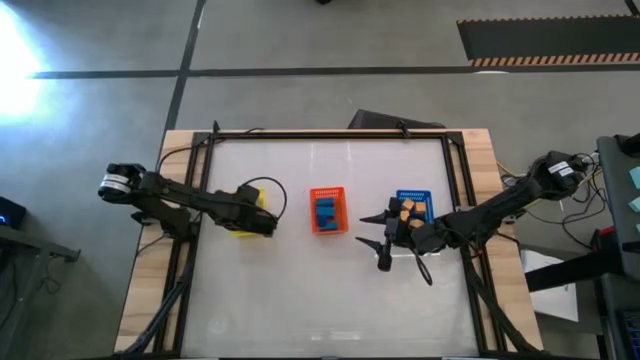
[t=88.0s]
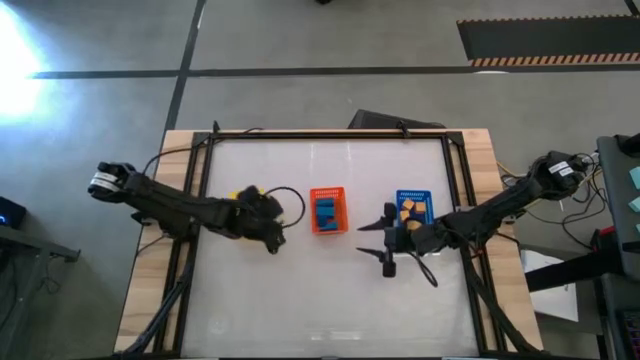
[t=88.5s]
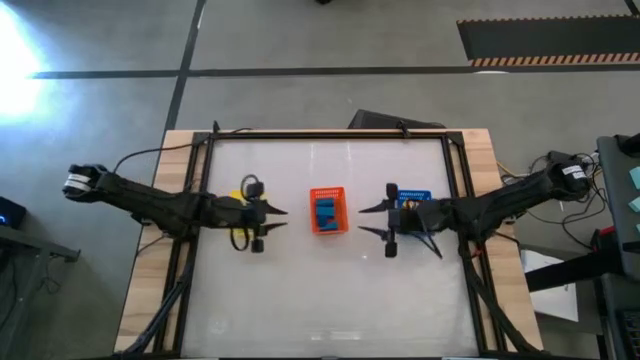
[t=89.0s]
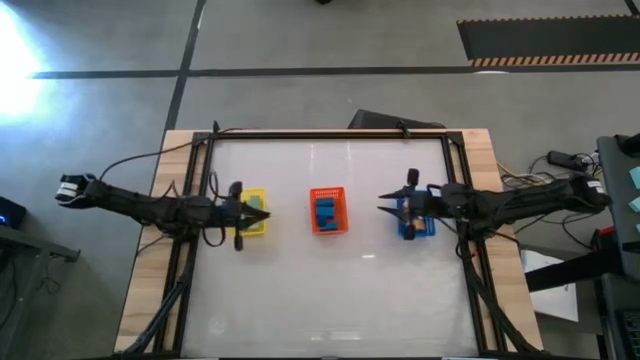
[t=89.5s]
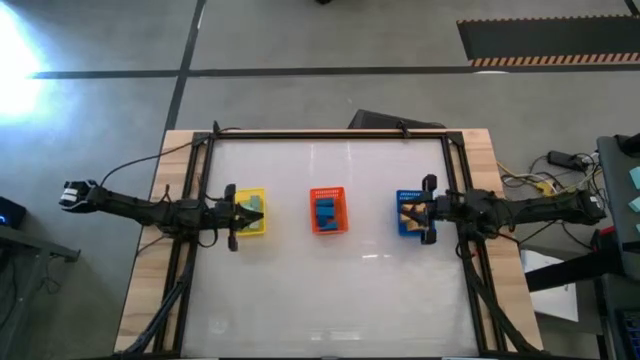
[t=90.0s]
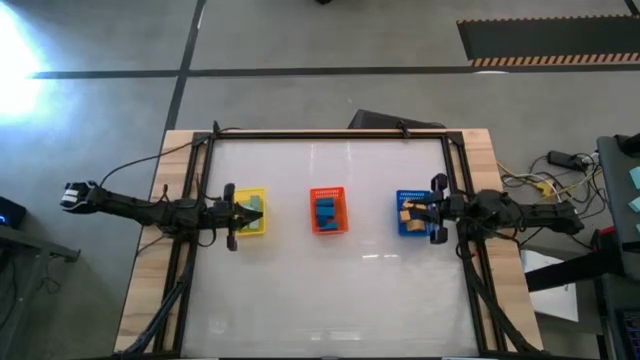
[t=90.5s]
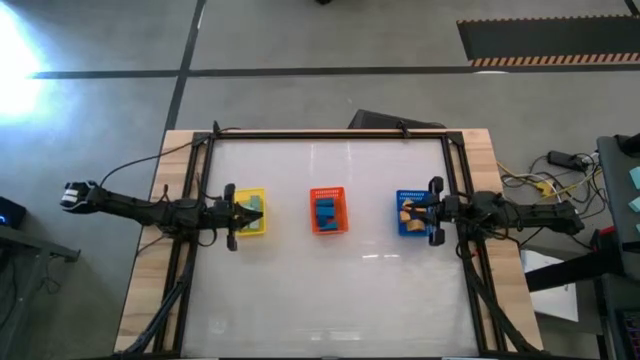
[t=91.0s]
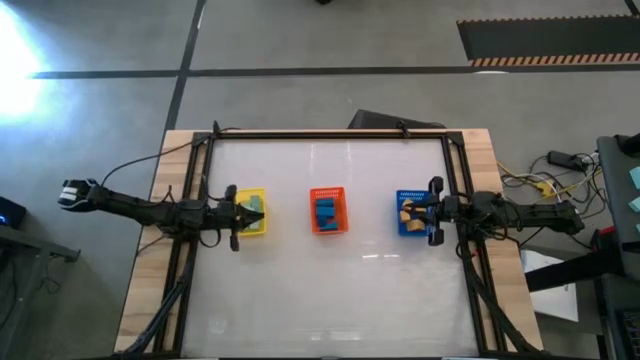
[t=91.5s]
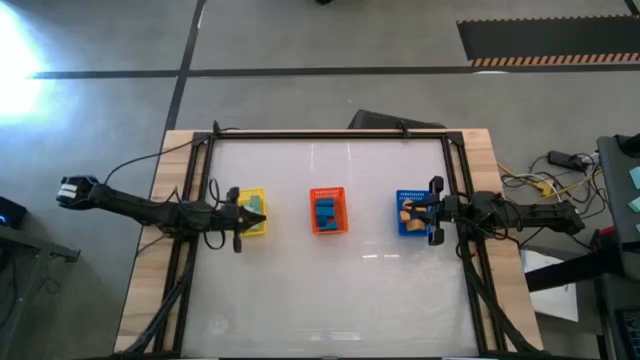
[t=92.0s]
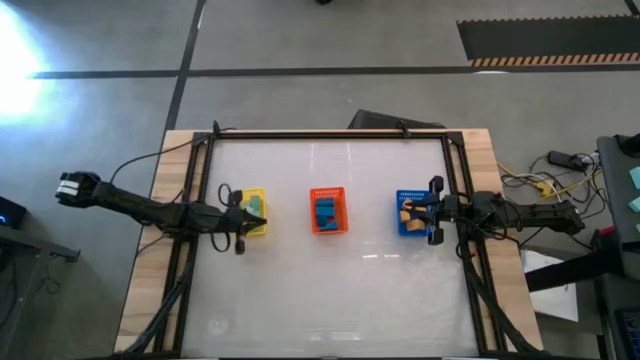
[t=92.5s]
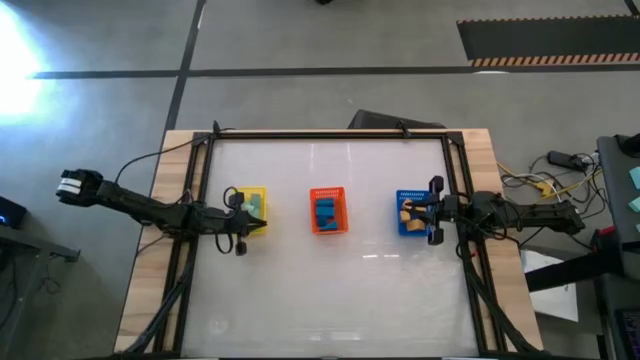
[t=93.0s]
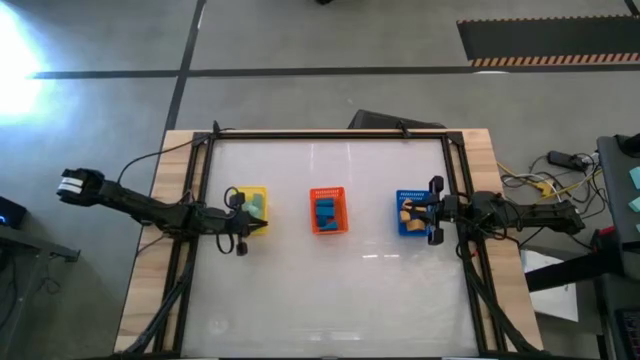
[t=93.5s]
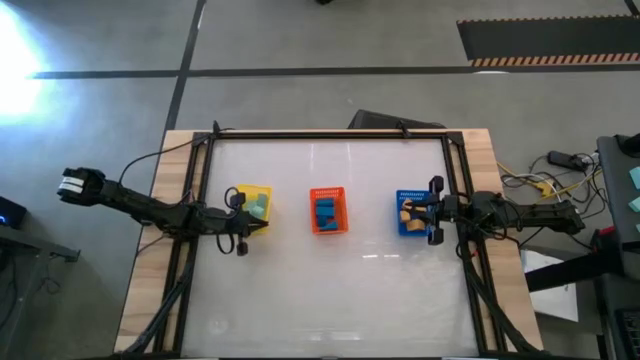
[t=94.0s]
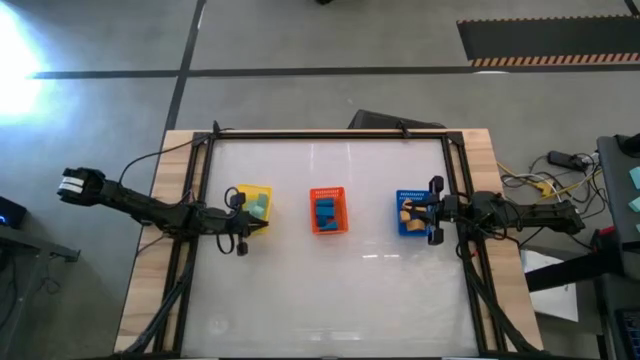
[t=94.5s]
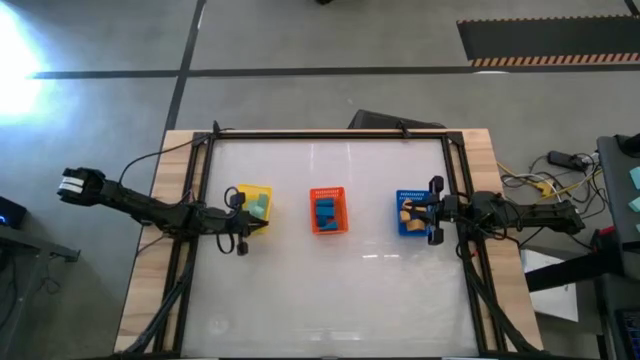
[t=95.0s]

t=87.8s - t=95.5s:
Task: Sort & place blocks by color
Return to Home Position

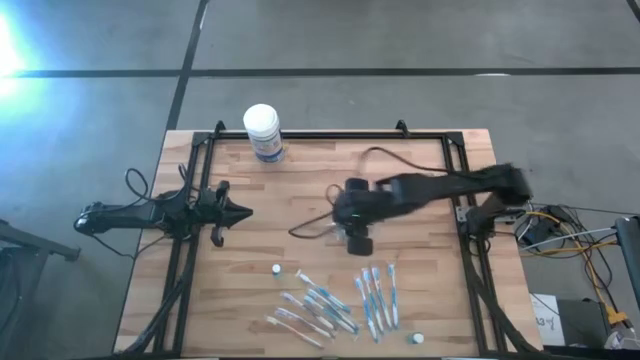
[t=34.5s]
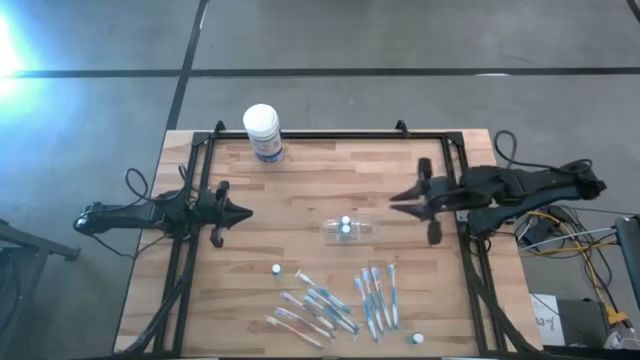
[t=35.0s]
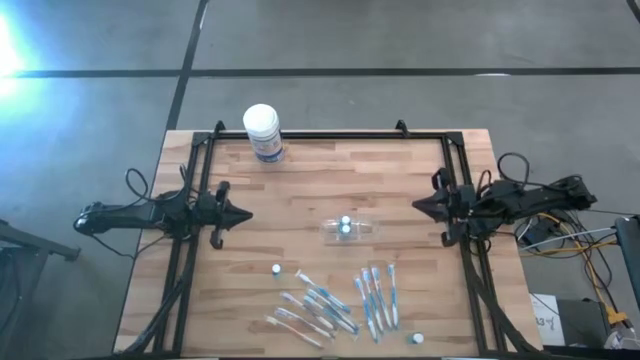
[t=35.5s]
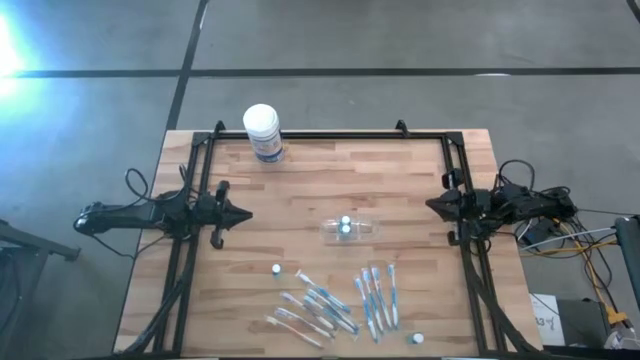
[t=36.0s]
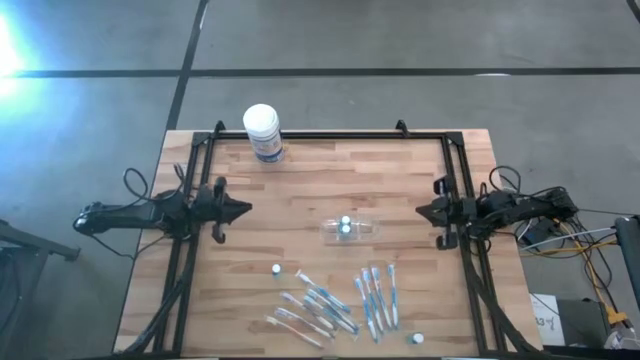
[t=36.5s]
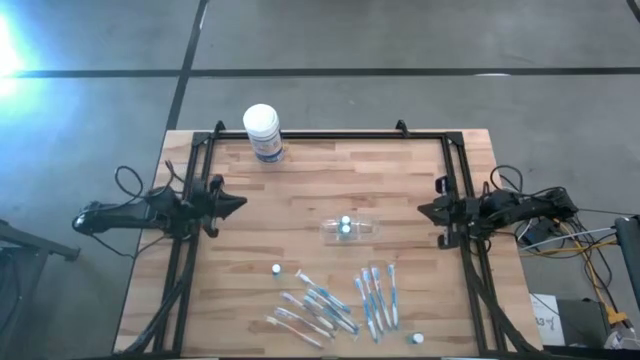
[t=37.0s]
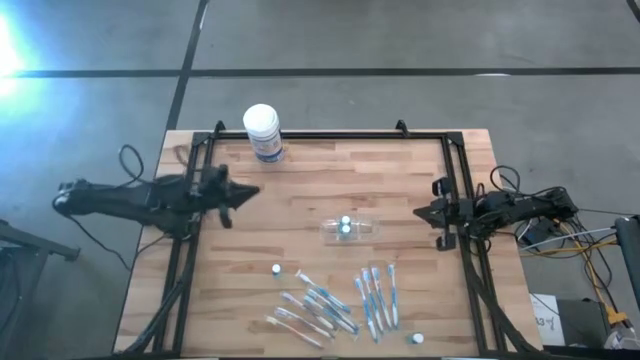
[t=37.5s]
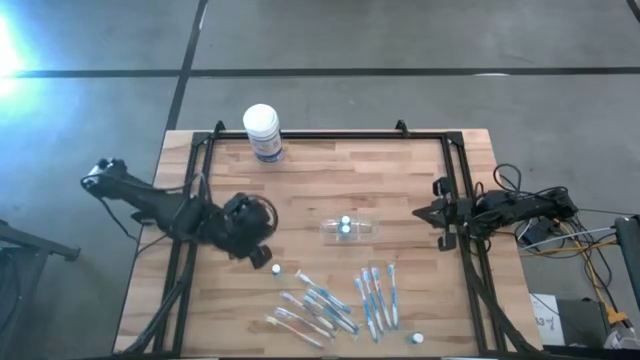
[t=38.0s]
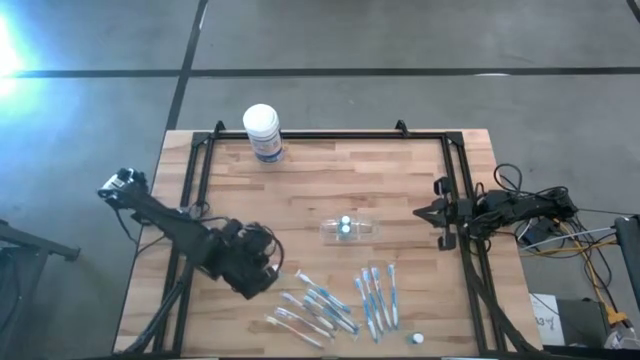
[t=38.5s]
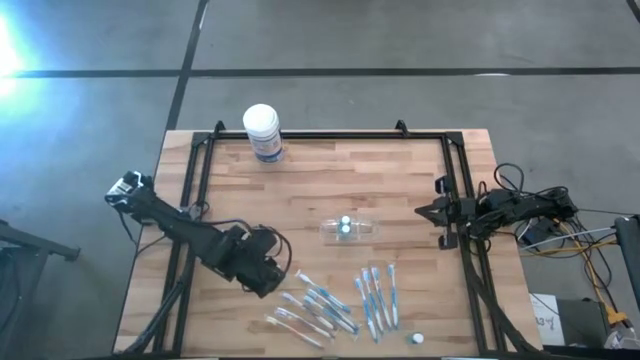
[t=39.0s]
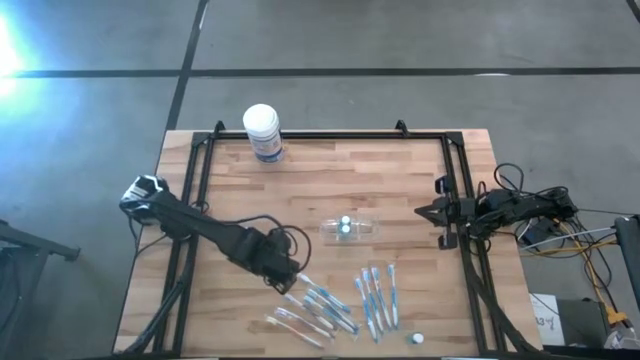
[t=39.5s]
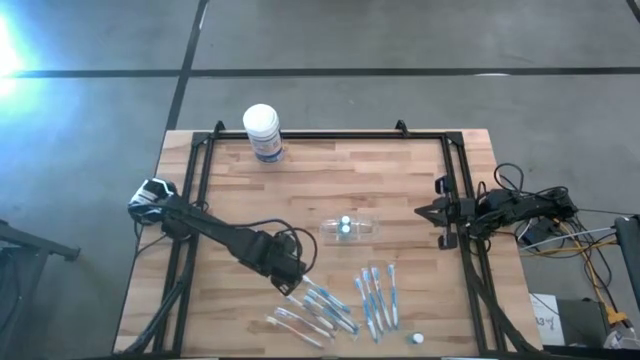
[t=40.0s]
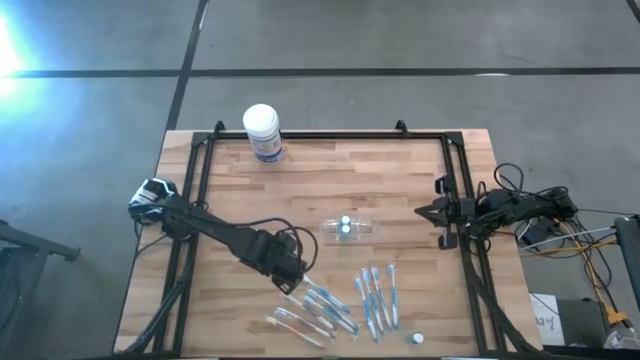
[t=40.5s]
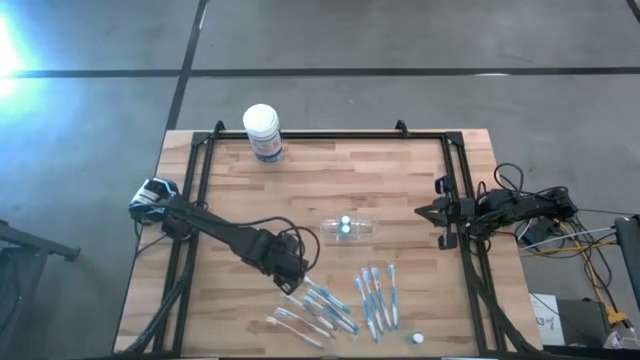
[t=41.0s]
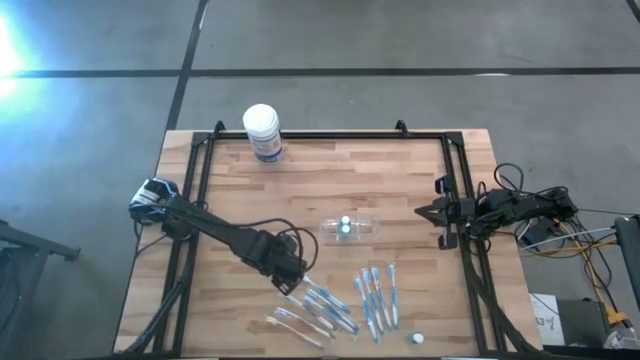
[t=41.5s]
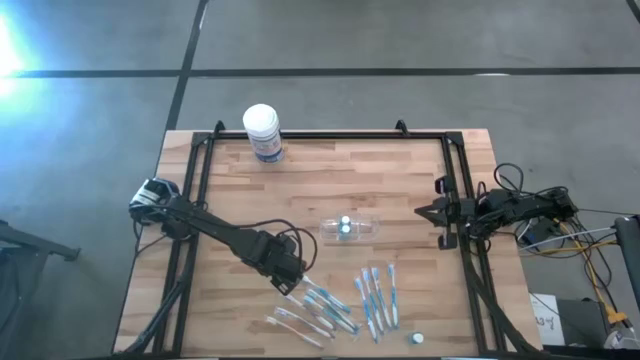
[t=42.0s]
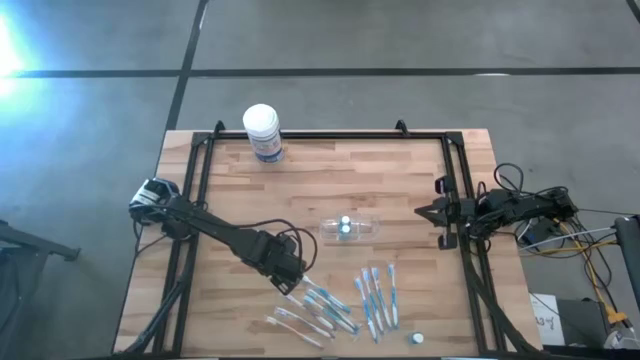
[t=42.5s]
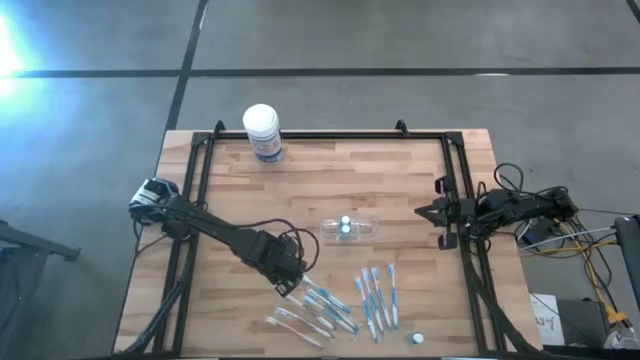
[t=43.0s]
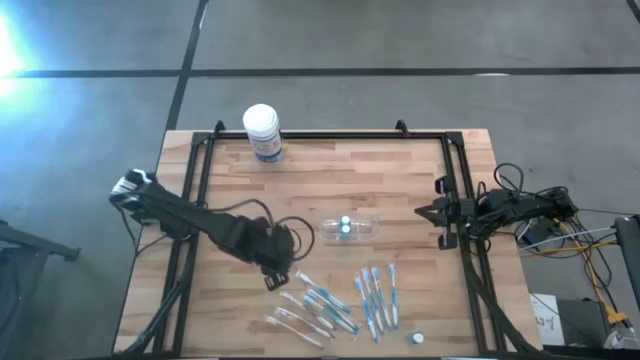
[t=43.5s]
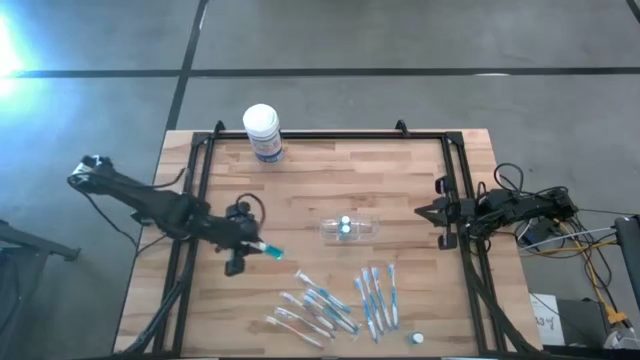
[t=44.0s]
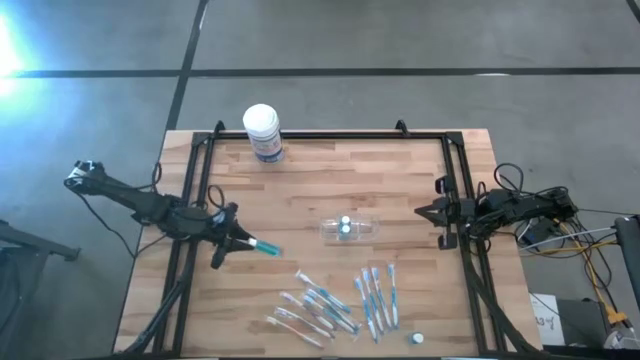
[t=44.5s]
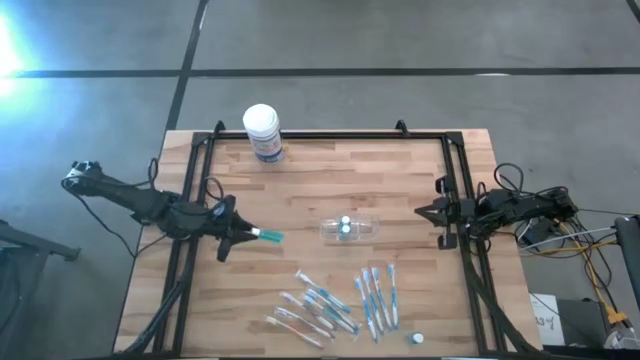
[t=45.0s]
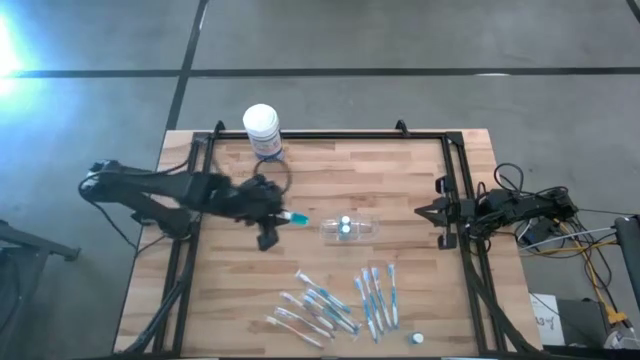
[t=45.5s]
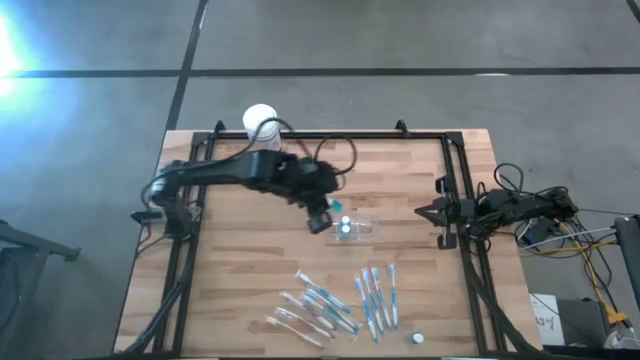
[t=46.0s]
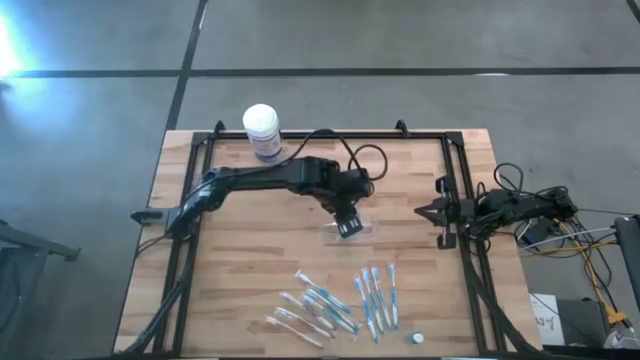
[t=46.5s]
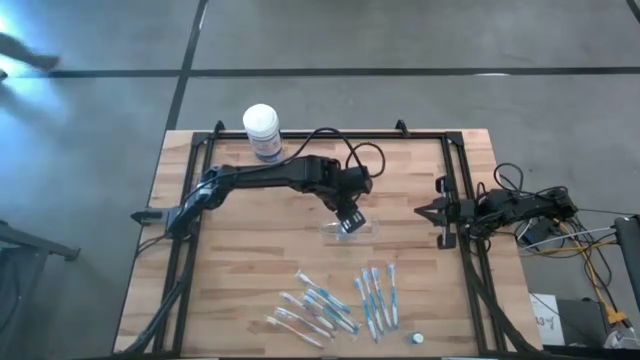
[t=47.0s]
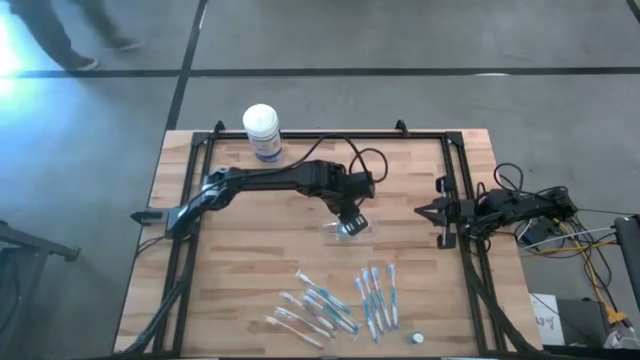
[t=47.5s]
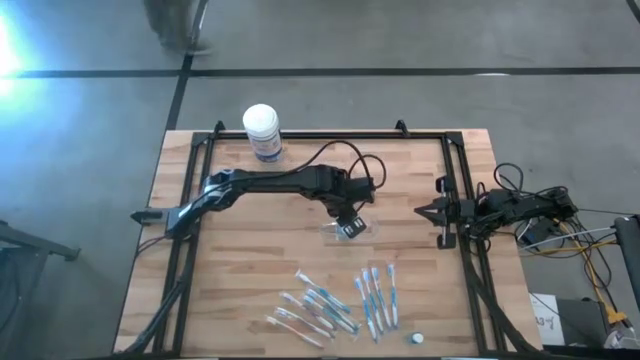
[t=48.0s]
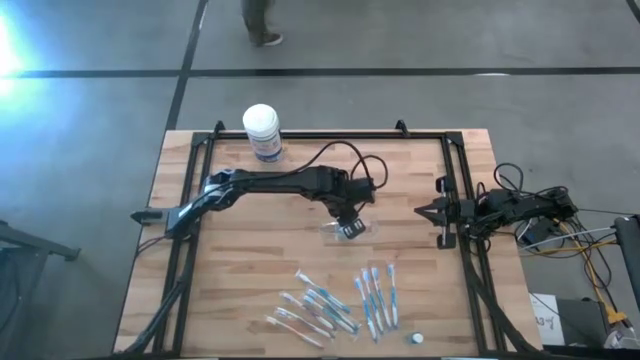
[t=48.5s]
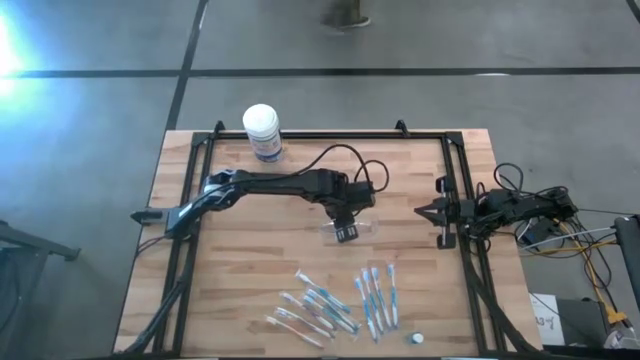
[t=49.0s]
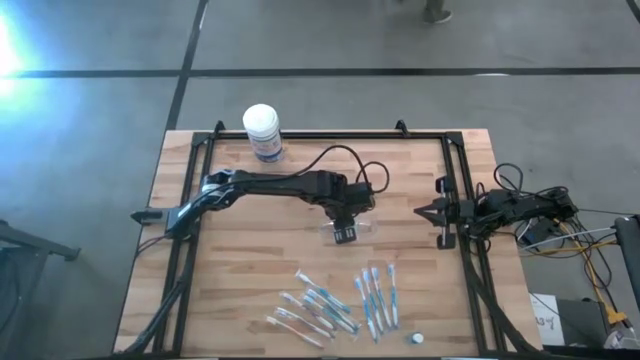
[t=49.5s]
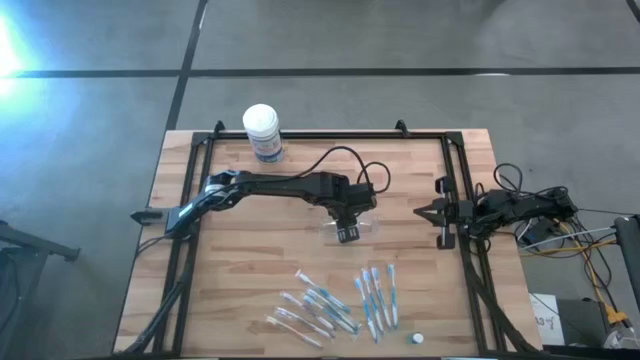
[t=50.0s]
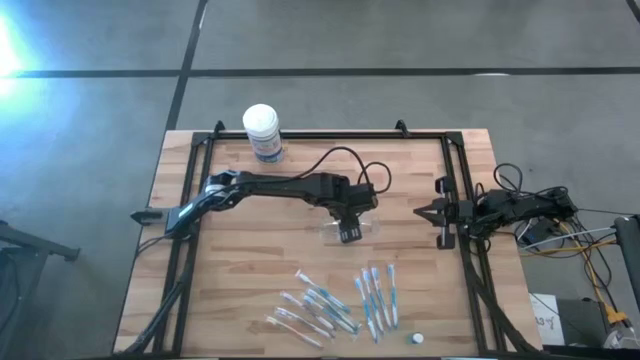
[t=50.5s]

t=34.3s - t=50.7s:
Task: Pick & Place toothbrushing station
Put the blue mouthwash into the transparent organizer
